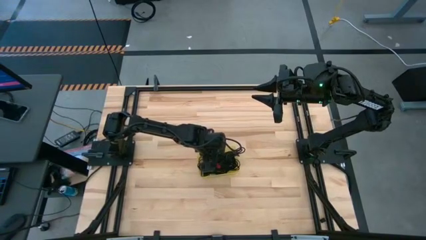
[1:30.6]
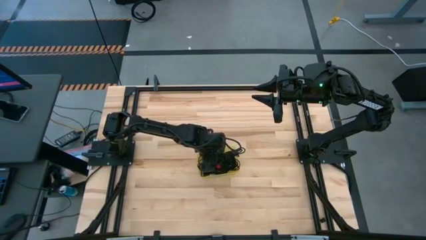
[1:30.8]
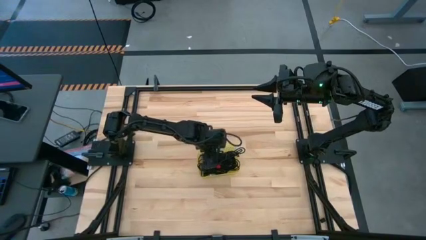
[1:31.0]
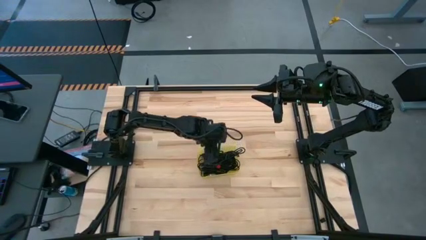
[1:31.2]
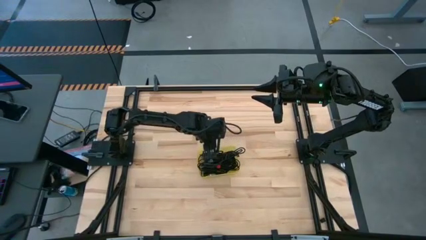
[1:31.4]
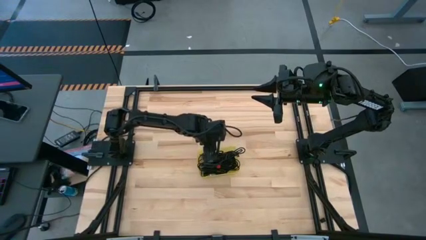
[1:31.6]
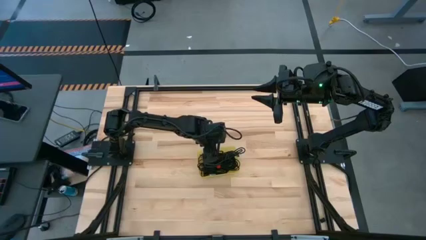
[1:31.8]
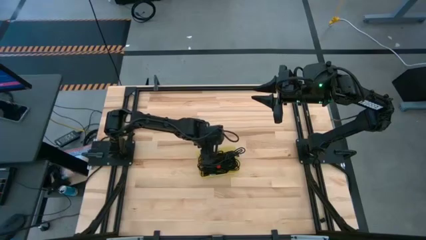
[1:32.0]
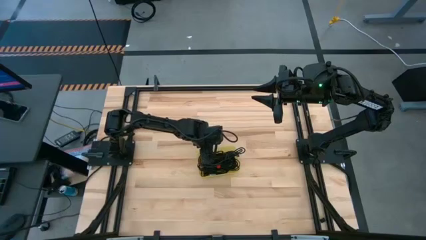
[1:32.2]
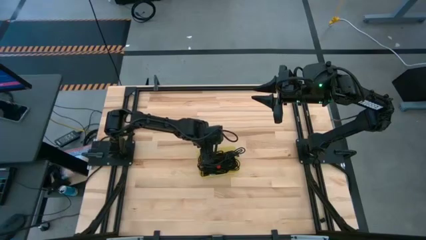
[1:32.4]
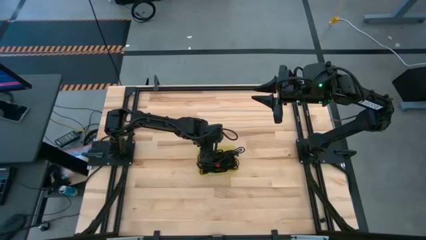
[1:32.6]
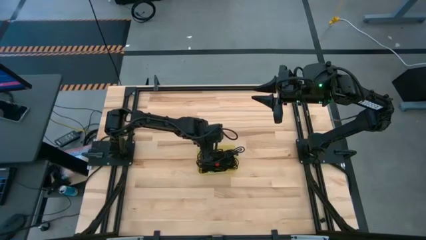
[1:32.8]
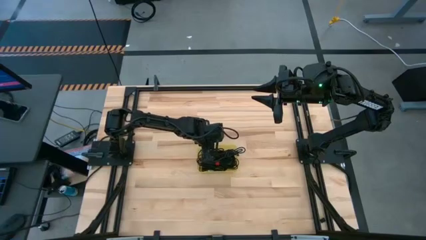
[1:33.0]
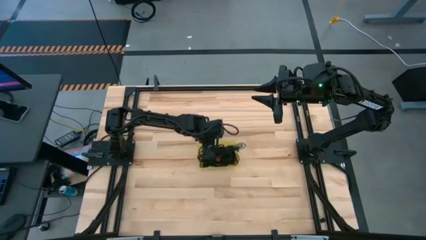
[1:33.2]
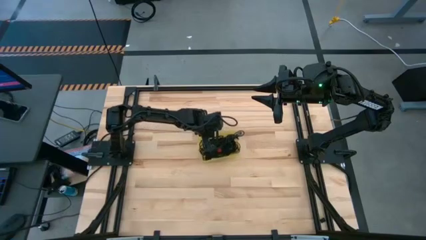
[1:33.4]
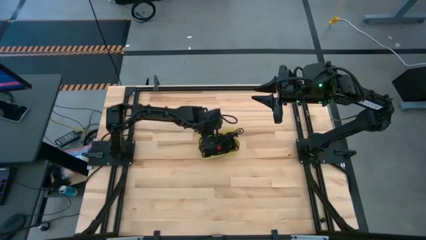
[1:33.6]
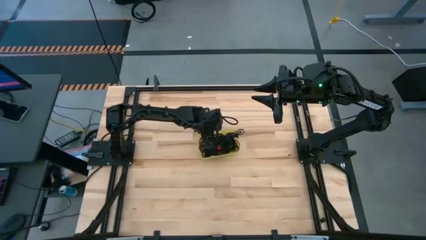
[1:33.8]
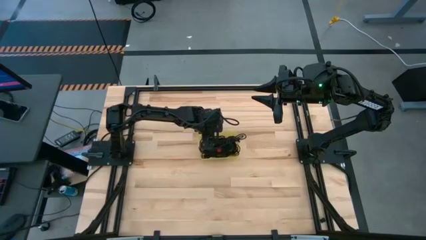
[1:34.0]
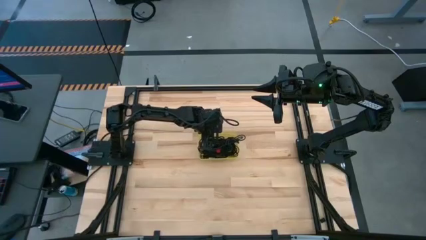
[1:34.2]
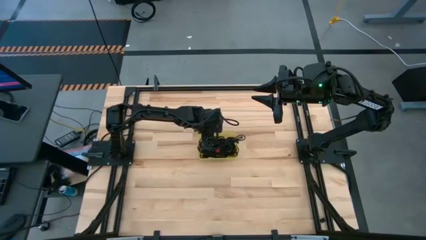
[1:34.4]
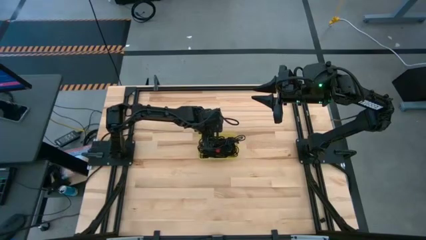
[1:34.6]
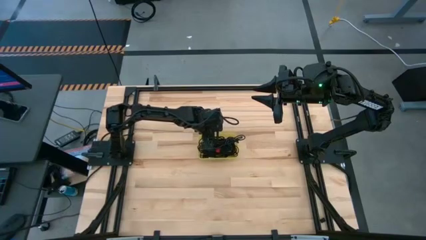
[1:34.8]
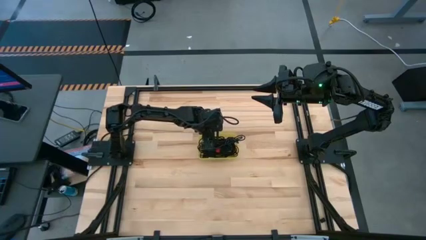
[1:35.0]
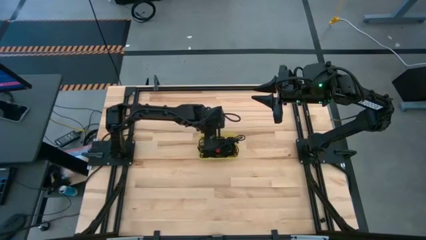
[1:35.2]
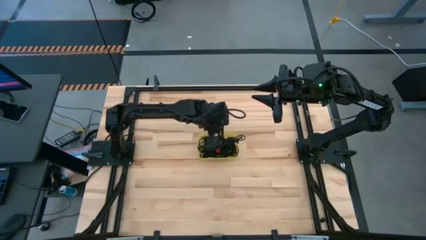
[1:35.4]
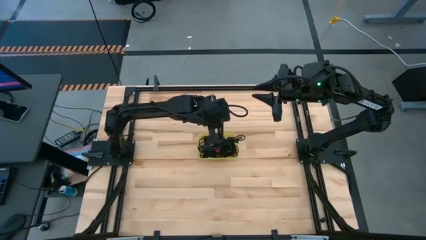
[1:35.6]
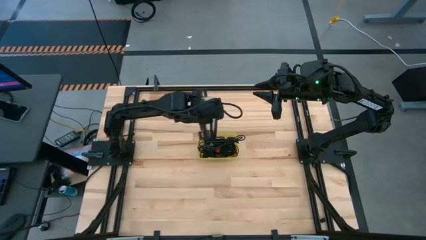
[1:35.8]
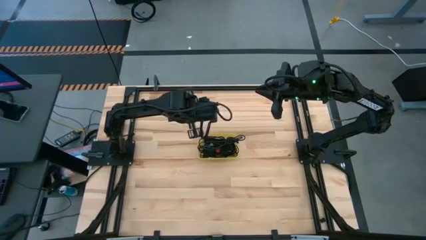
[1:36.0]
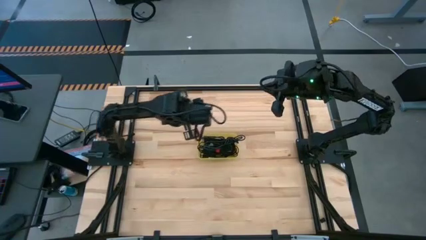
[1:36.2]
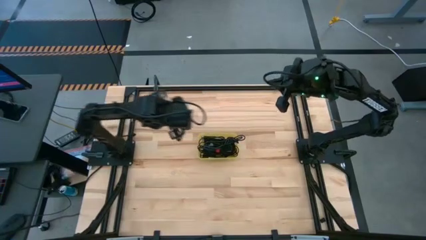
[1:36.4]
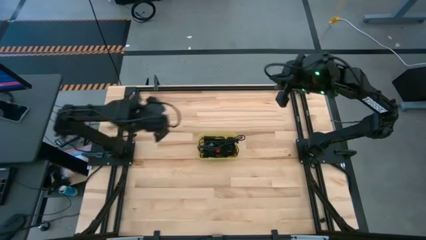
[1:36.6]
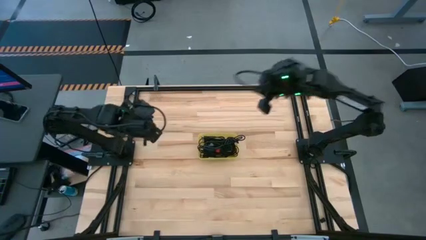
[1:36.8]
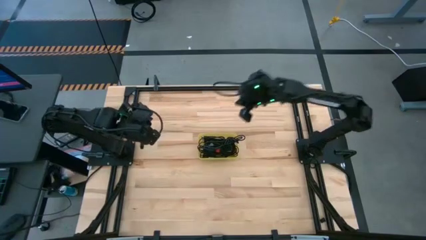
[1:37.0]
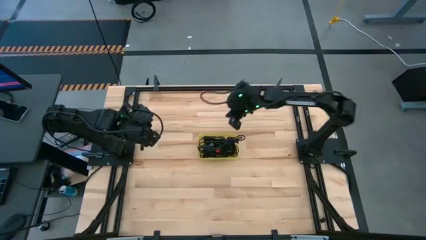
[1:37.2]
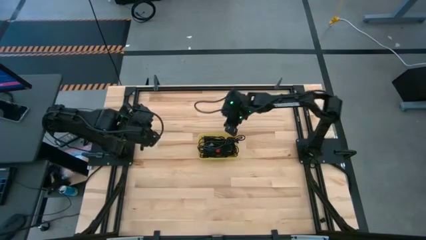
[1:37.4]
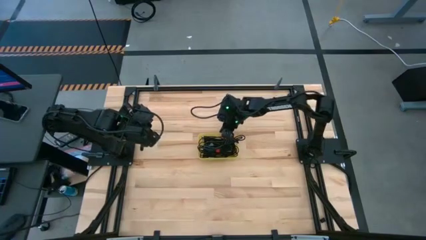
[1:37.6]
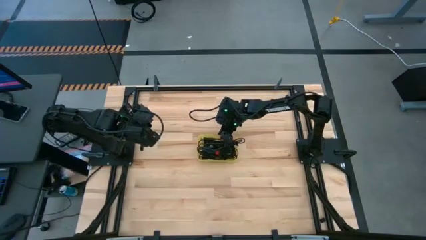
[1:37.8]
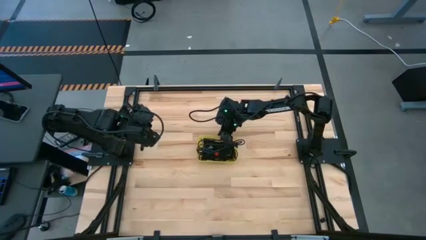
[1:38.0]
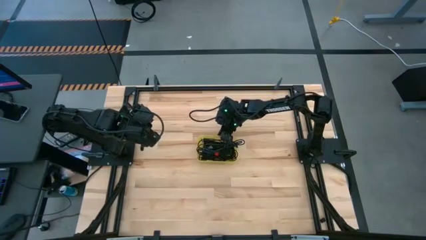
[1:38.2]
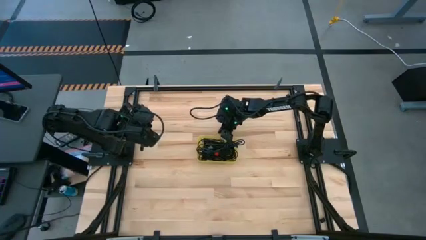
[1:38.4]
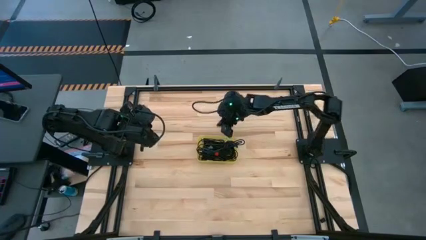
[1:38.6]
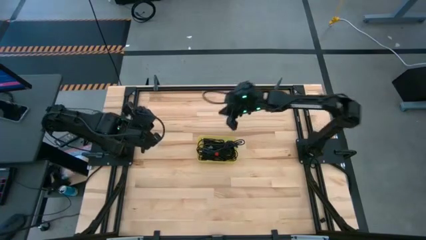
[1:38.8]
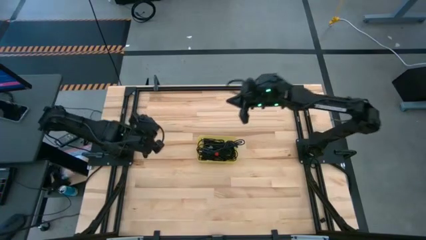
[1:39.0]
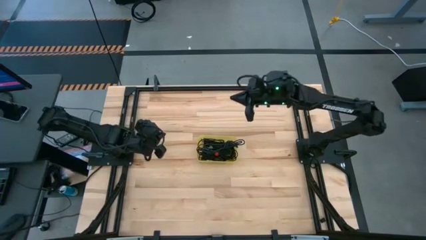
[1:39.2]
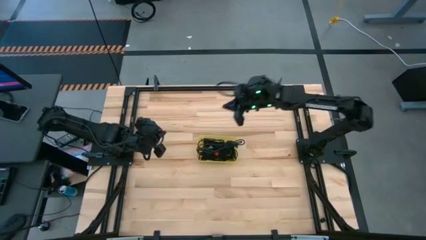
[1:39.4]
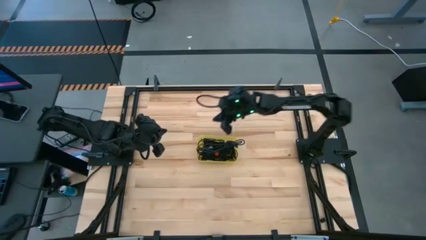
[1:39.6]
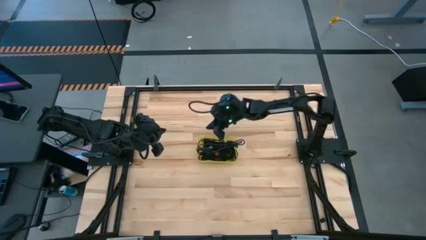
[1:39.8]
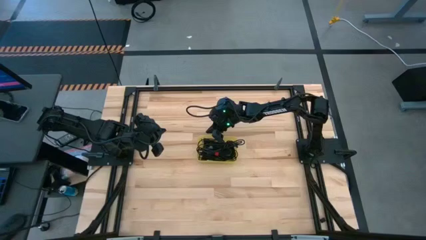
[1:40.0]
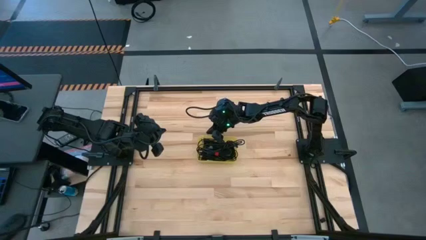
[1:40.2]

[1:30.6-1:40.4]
Task: Pick and place USB-C Cables
Adjust the yellow bin

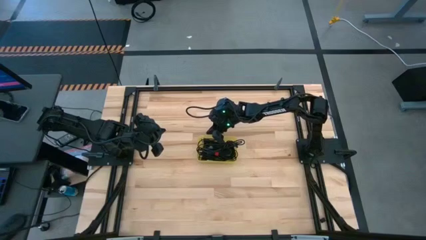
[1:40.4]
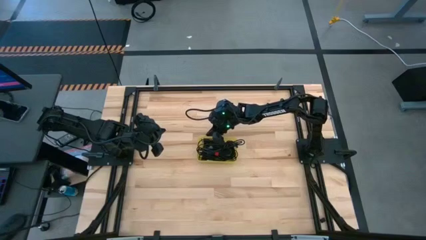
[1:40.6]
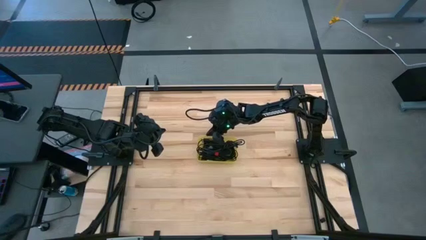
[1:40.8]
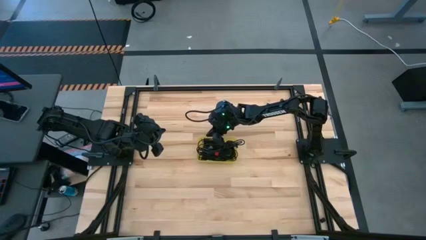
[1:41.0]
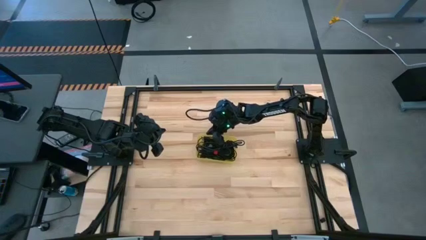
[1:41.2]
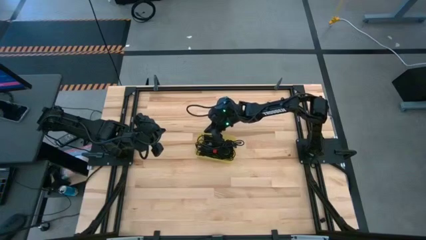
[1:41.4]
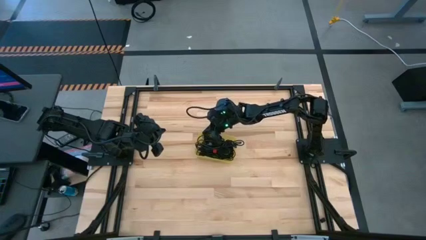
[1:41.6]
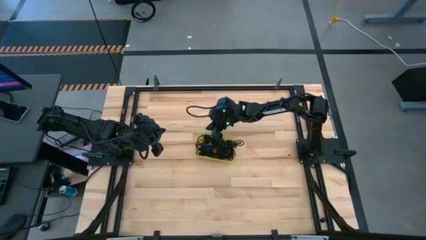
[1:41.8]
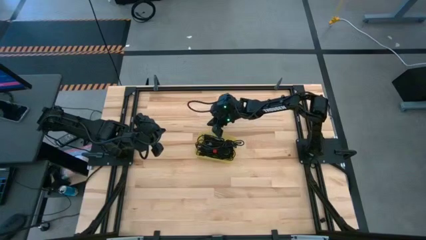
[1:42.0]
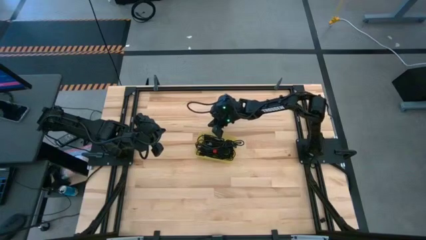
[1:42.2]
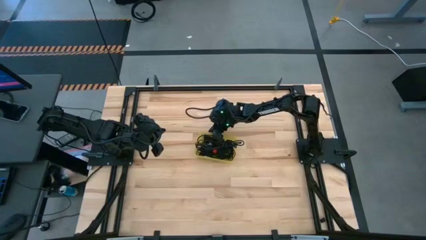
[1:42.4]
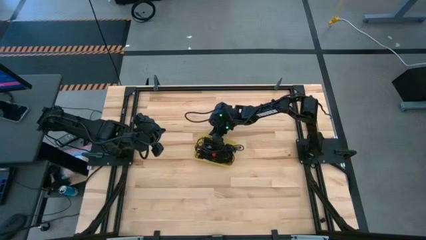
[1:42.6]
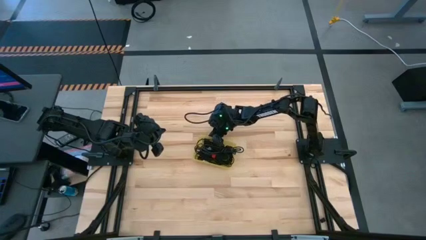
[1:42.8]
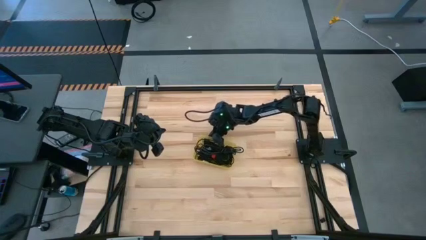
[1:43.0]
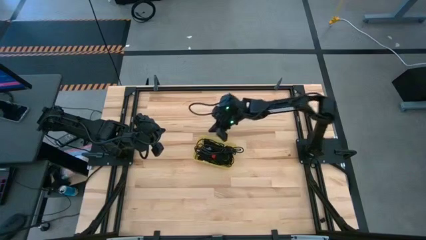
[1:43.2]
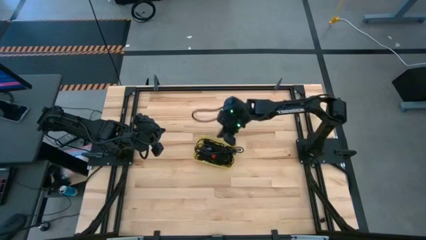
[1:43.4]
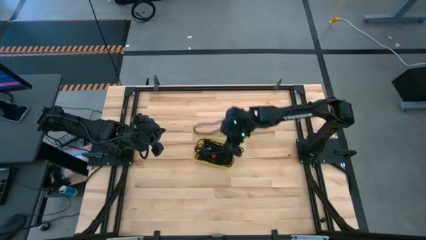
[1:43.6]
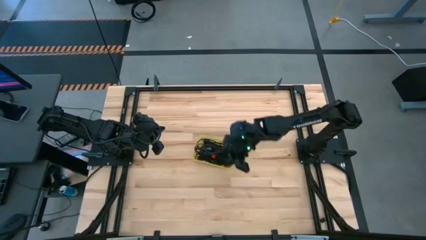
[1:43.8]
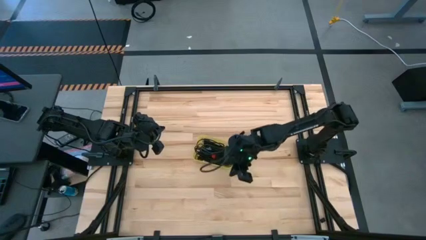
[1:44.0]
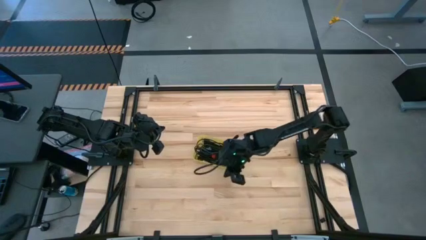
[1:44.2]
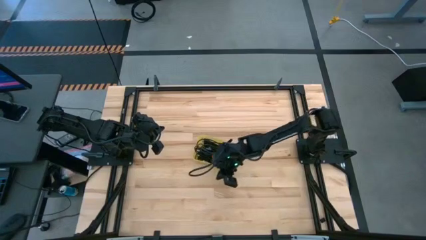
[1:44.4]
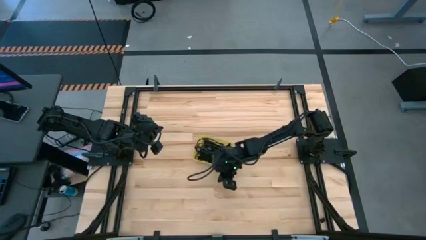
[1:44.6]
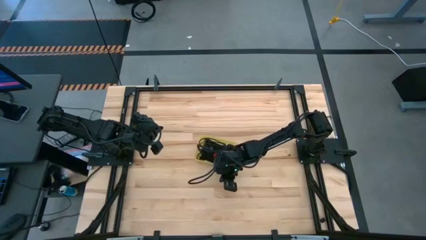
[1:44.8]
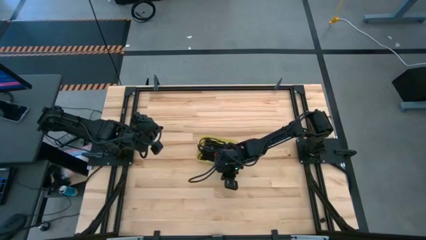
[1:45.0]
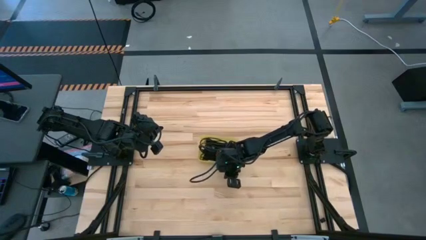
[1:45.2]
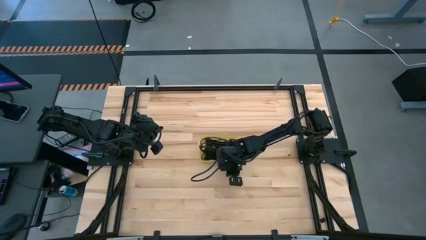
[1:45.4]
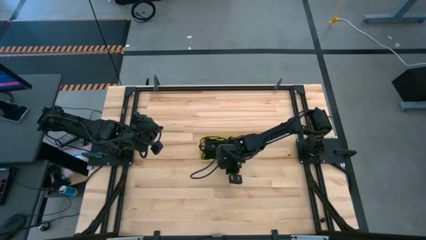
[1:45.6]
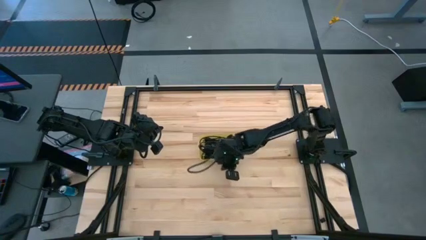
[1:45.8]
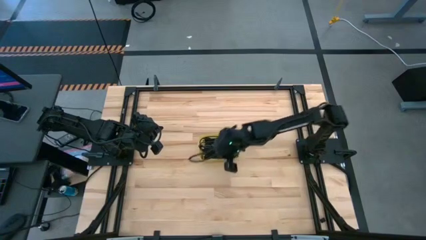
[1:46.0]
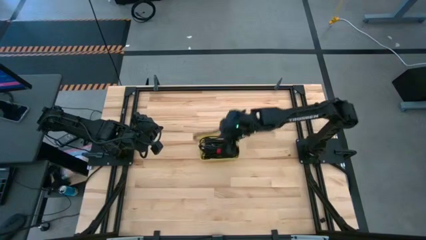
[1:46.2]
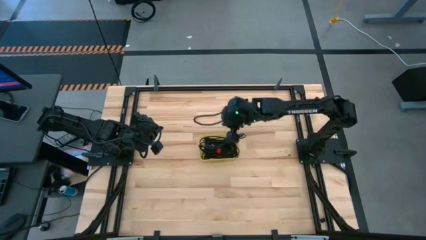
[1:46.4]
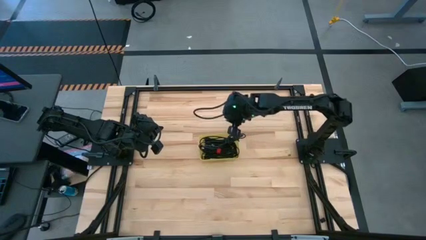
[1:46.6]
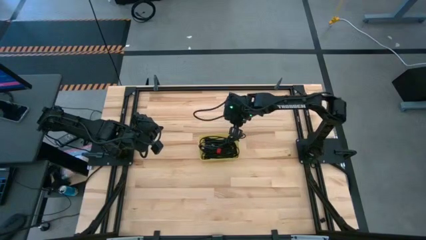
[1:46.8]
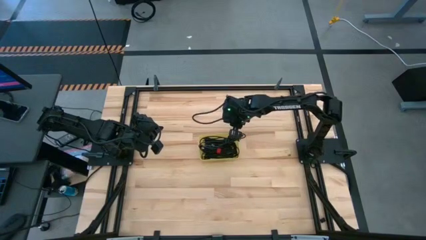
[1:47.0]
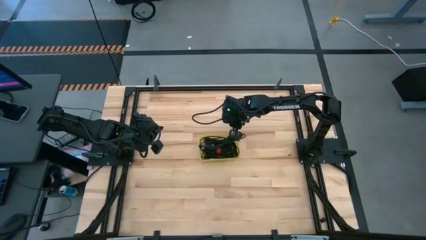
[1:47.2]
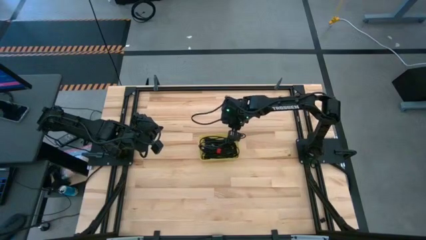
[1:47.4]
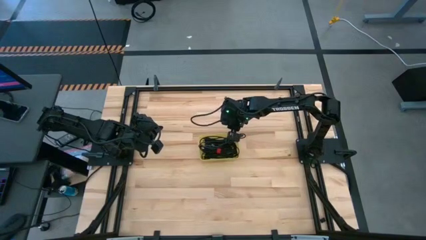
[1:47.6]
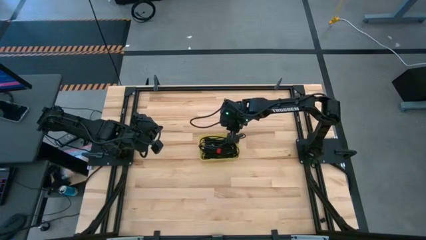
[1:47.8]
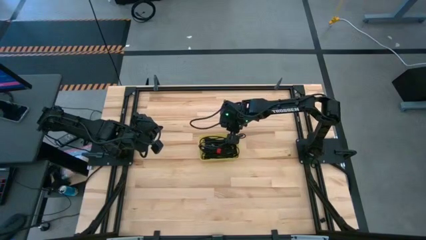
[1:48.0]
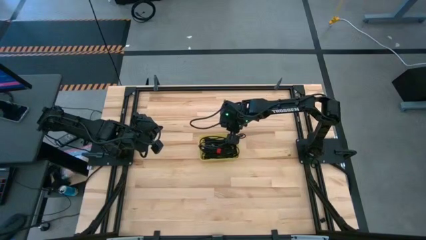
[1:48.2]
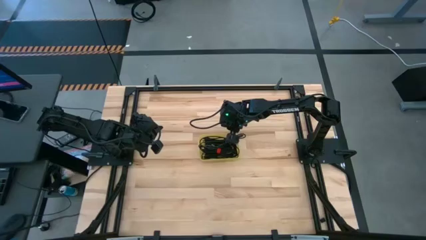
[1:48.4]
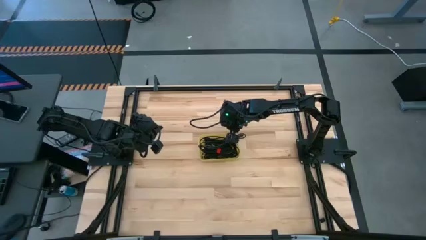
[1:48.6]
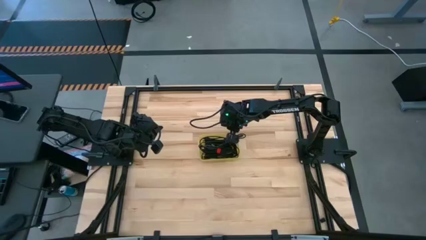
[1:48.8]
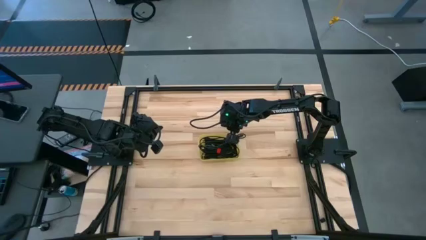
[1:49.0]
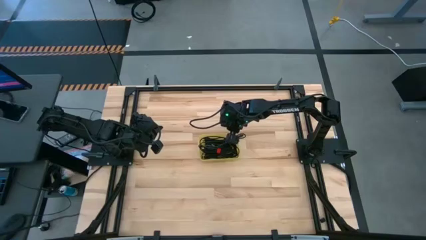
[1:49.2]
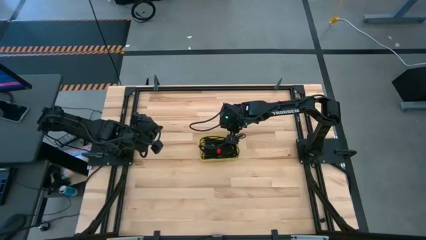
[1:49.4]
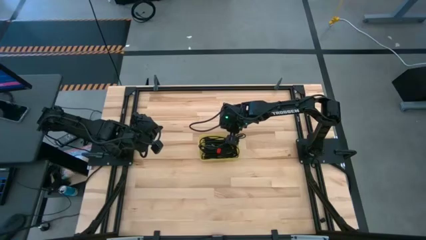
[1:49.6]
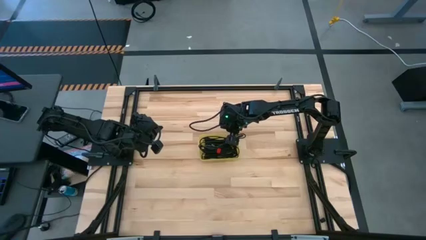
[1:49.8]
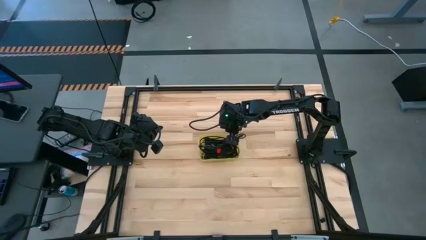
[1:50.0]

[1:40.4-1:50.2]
Adjust the yellow bin
